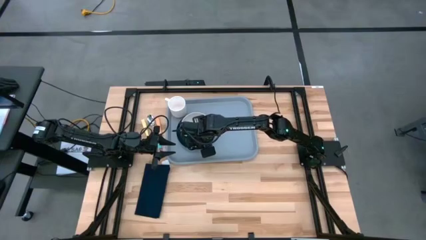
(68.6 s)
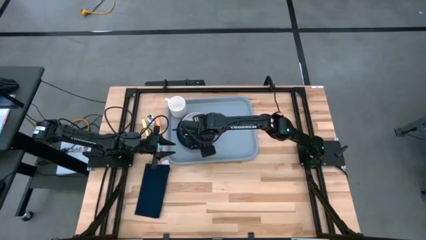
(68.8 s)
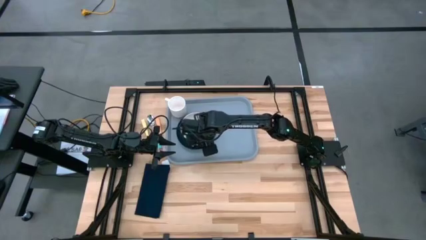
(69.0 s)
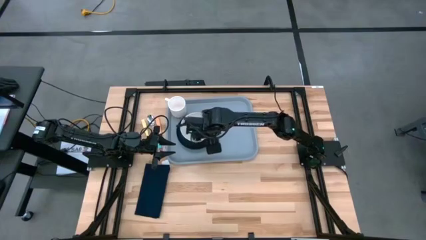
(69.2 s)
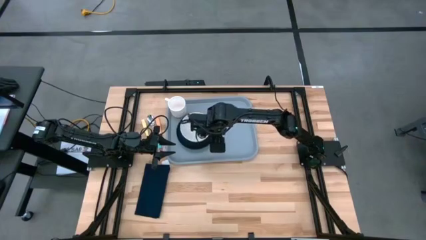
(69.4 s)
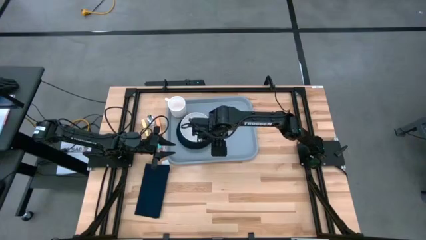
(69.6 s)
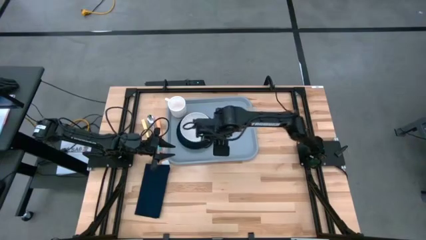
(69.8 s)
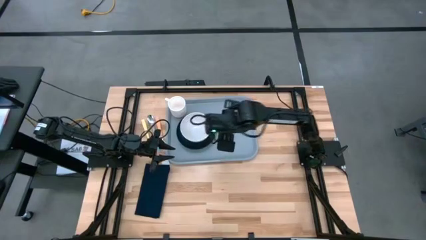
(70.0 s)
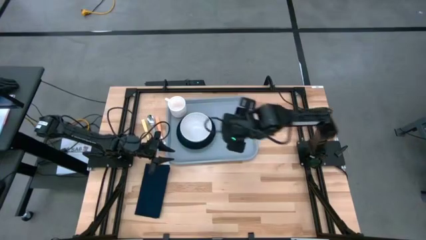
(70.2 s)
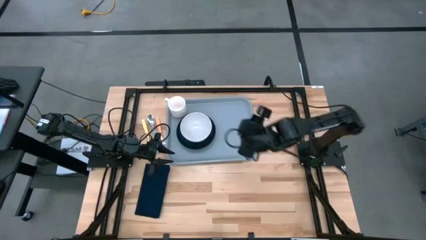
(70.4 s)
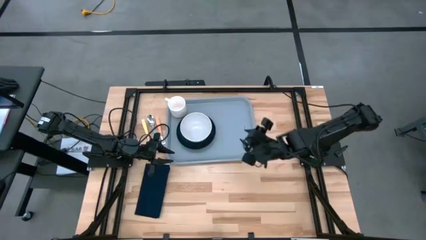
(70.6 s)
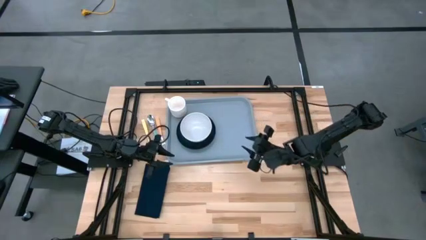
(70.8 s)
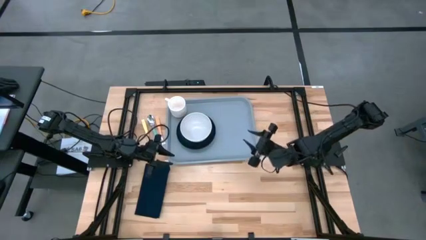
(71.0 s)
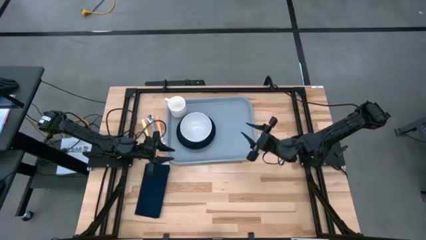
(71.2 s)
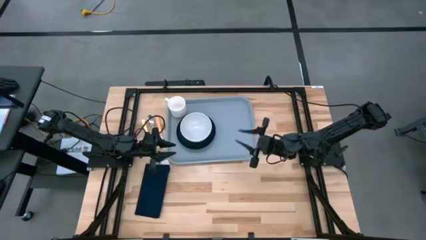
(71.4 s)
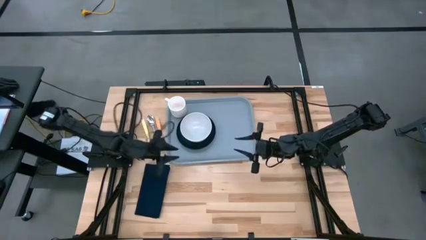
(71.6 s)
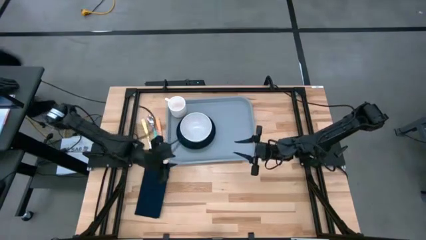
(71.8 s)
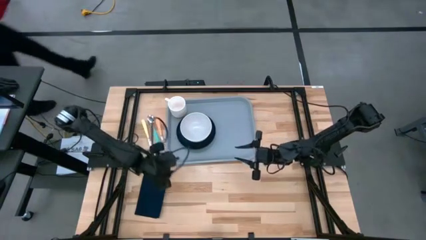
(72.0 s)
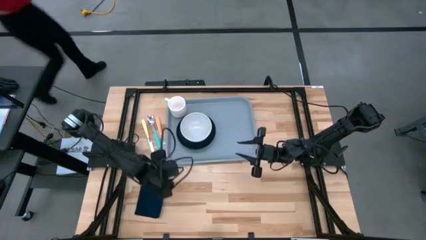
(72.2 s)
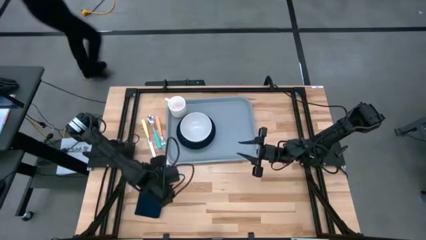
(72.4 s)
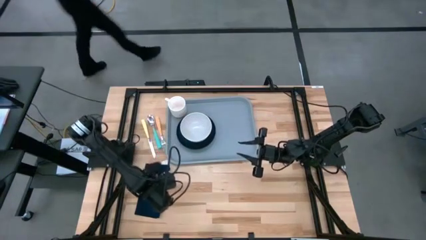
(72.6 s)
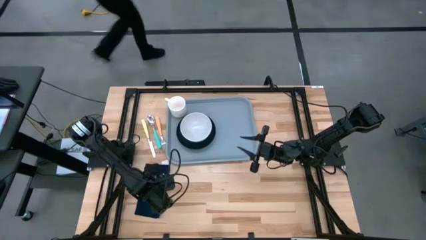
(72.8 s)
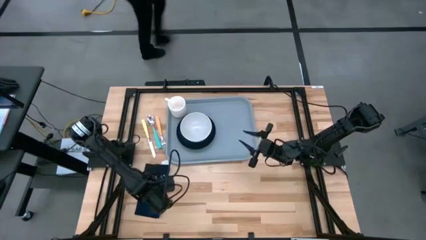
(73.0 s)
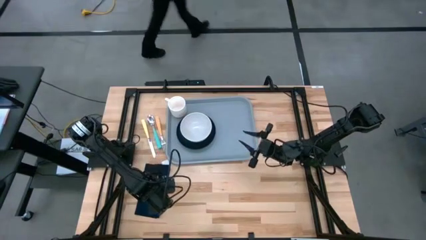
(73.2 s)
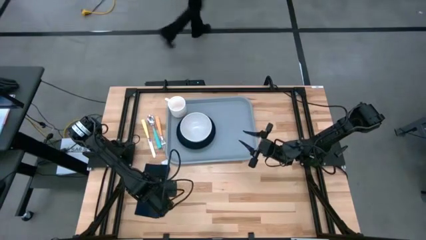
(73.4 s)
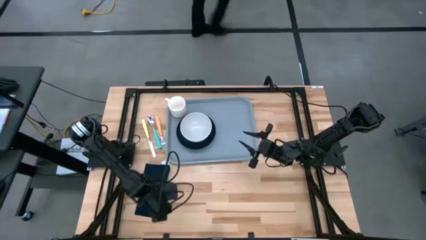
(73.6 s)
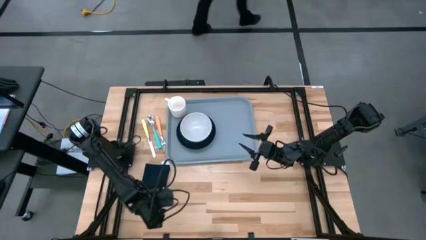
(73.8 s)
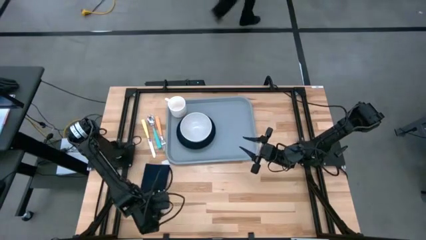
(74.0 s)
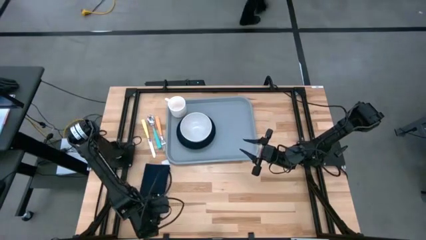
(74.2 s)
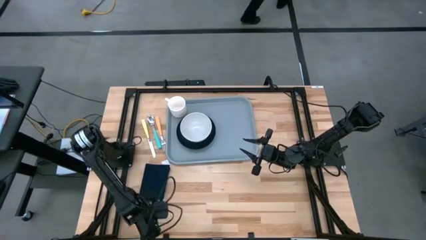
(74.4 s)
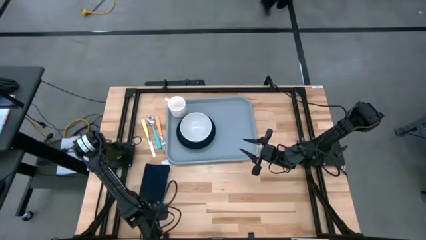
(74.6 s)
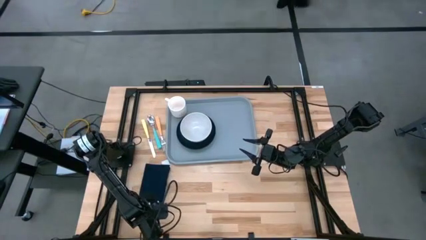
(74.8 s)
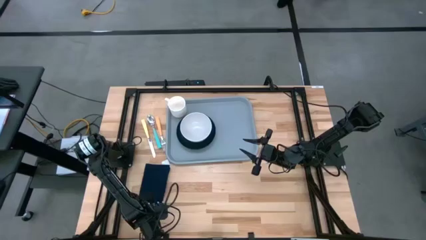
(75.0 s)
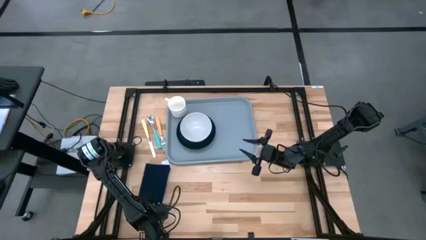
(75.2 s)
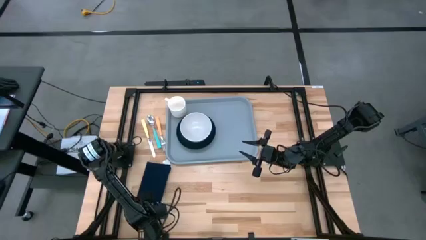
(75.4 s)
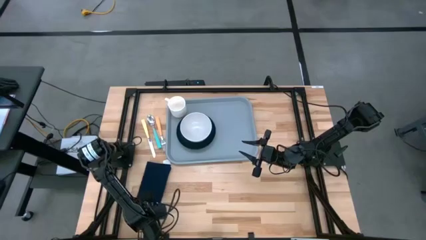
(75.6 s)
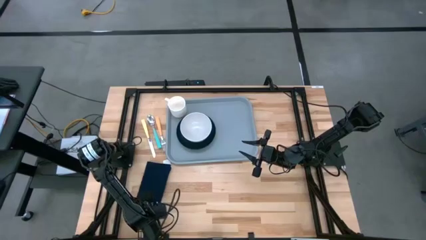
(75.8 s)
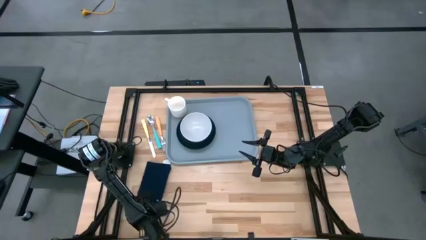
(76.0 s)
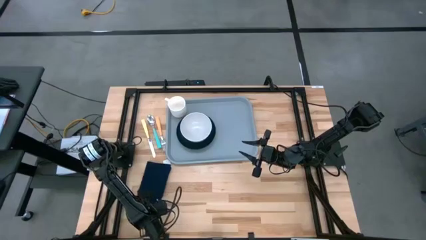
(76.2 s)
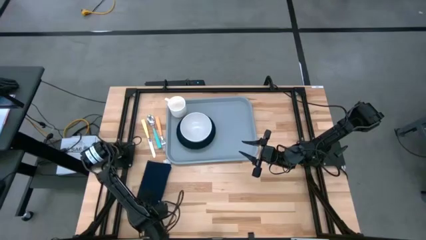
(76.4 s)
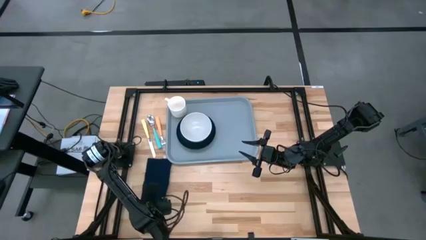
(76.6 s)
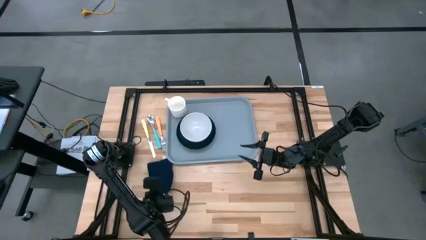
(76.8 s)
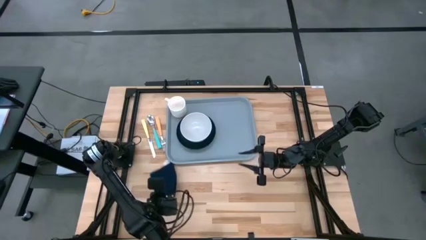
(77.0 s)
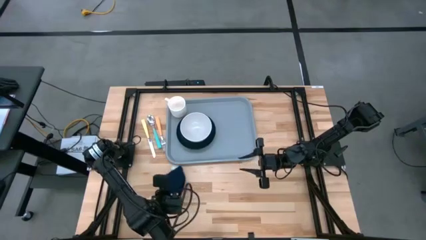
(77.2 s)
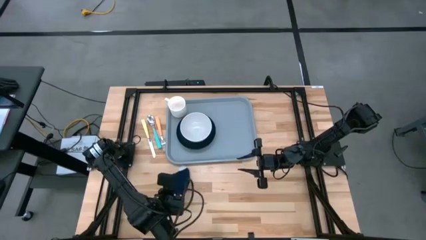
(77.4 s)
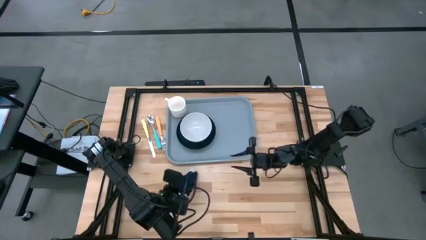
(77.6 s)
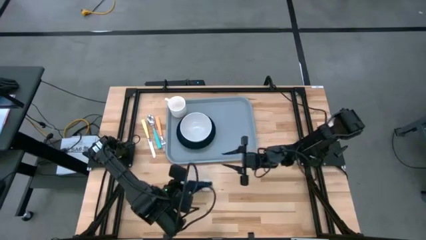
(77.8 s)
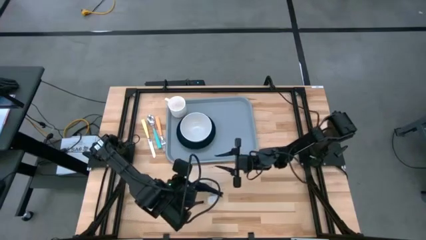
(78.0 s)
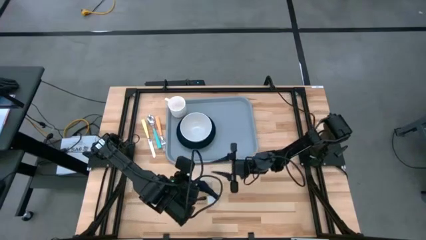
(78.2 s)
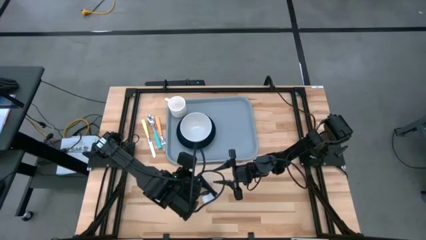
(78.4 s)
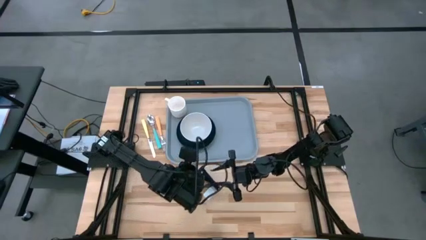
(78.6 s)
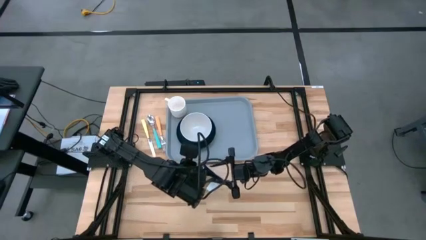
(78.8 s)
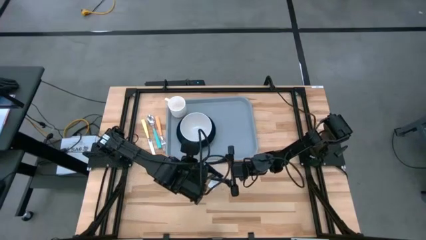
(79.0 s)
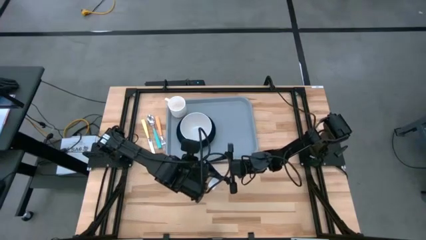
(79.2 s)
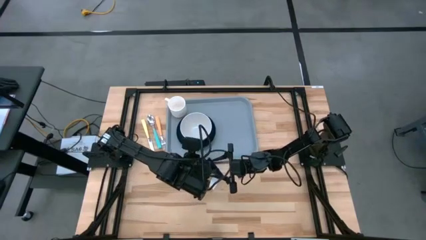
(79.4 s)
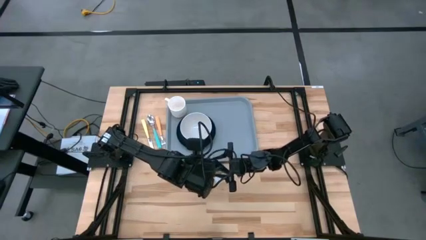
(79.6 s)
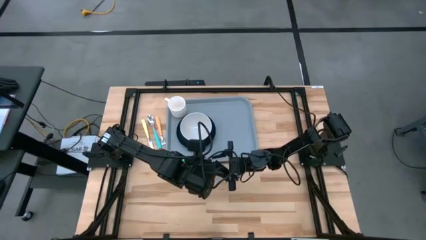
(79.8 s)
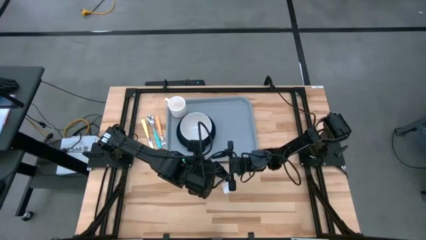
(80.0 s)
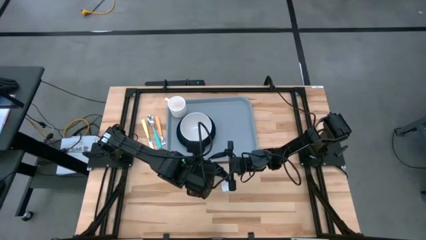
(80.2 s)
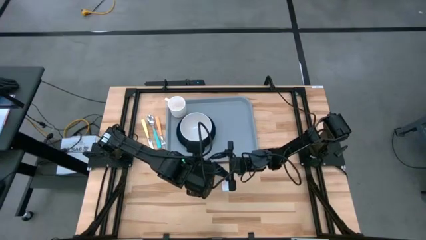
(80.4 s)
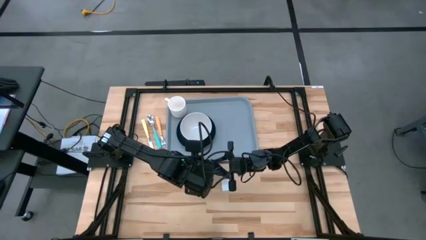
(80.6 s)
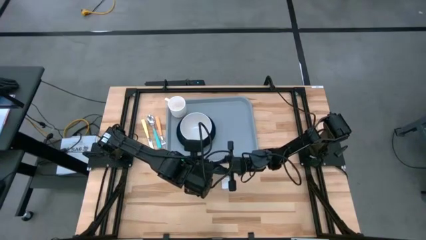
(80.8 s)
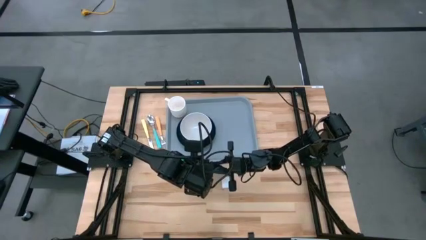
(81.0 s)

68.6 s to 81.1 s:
Task: Set up tray
Put the black napkin on the gray tray to the right of the black plate

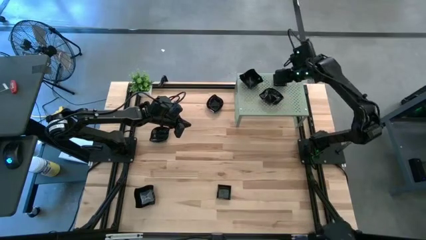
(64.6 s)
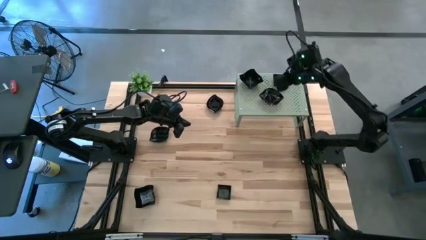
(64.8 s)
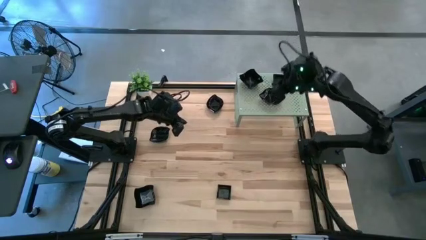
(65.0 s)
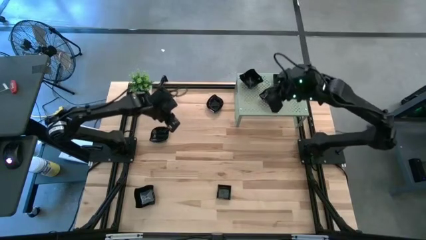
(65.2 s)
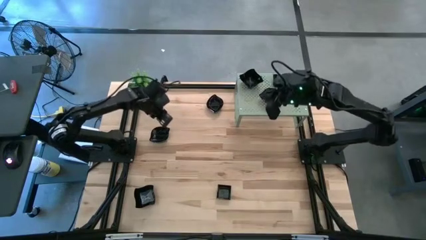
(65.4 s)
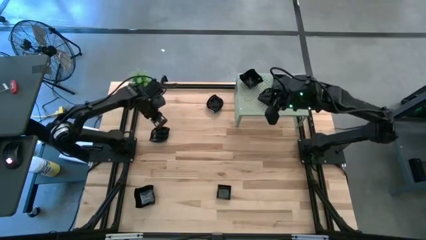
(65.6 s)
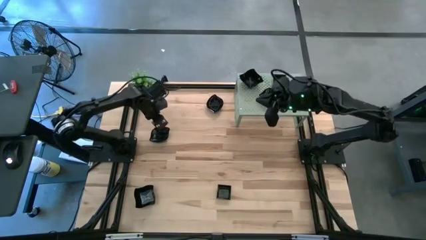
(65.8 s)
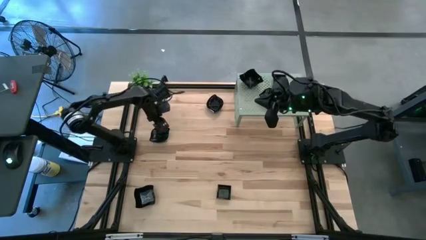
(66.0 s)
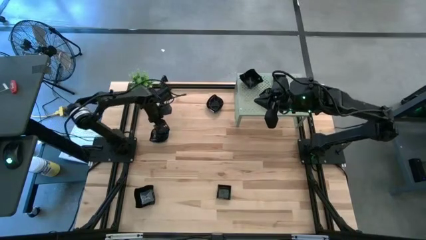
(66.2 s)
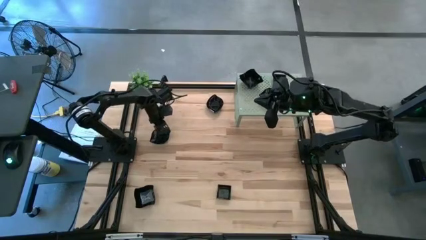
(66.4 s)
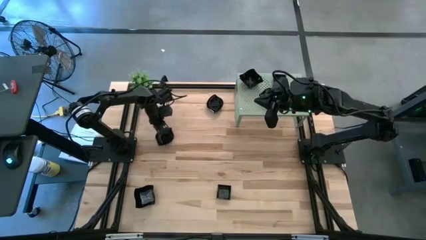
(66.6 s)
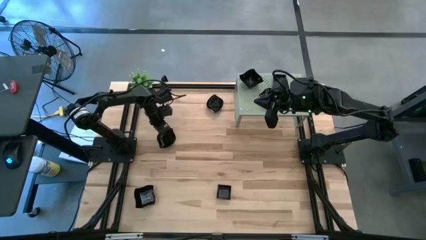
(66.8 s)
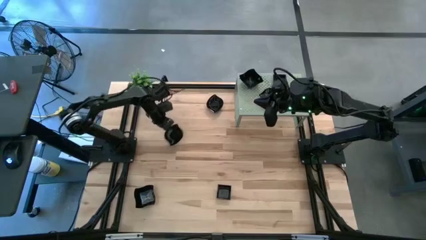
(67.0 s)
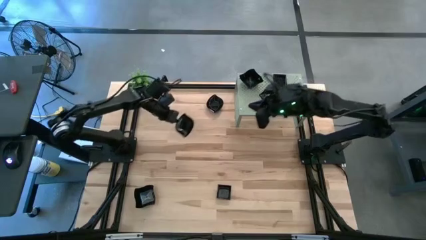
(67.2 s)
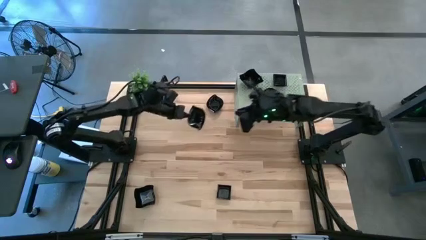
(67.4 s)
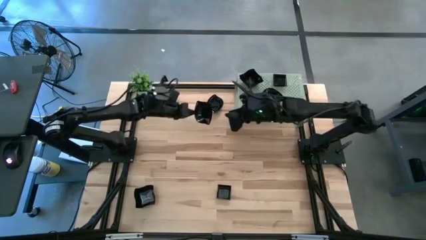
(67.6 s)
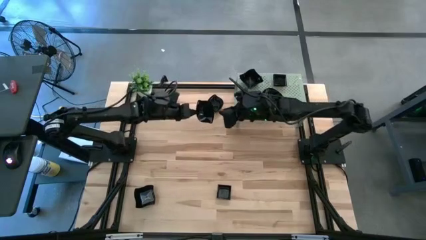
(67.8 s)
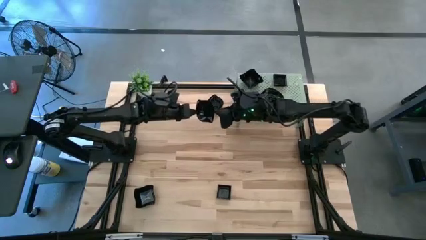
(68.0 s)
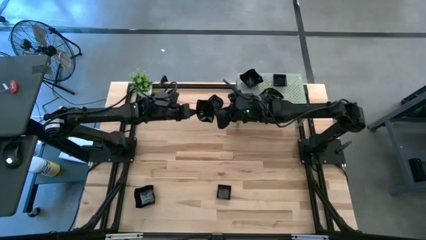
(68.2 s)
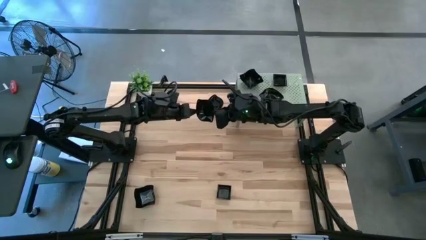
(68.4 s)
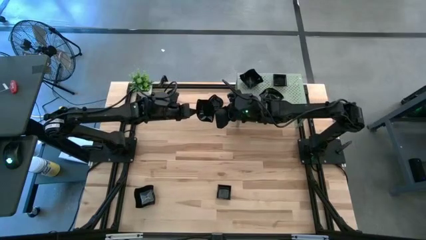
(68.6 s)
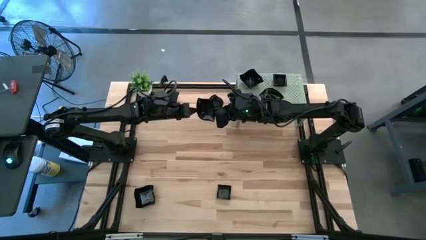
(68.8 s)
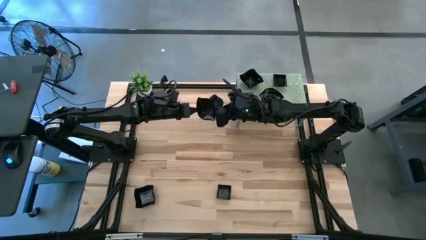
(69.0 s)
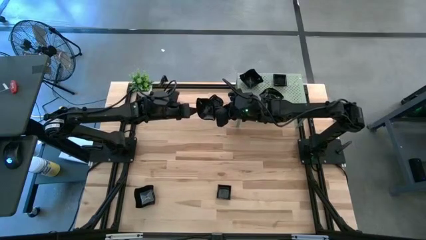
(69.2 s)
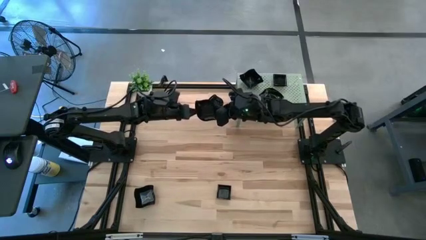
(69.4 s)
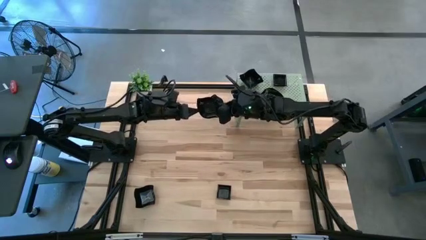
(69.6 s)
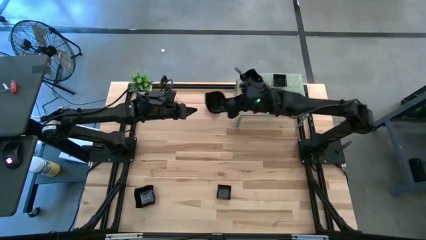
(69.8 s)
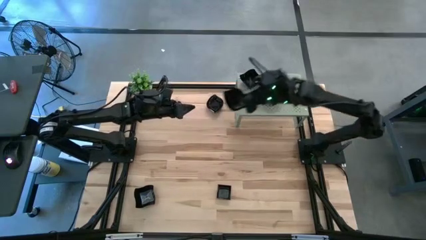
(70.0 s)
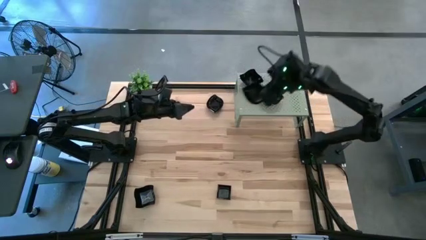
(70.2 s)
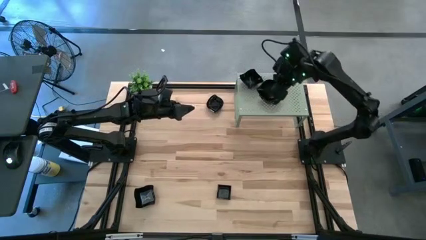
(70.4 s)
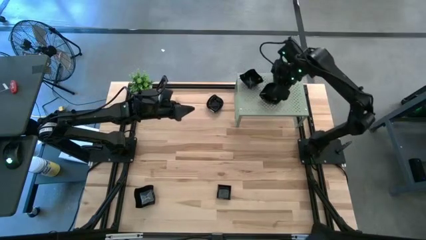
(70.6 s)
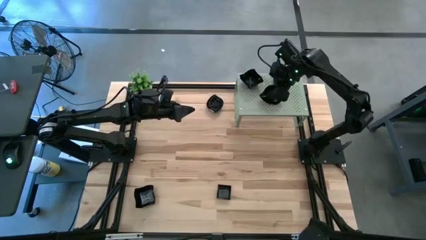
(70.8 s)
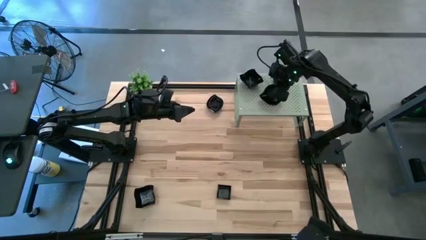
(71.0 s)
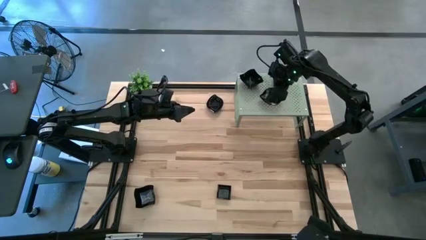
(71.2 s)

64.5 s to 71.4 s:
Task: Pick & Place Mini shaped plates
Stack the leaf-shaped plate on top of the leaf-shaped plates on the shelf
